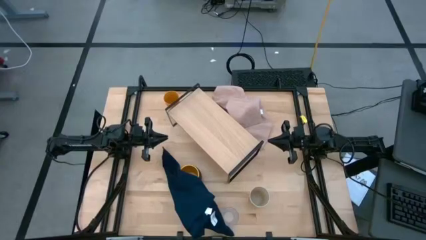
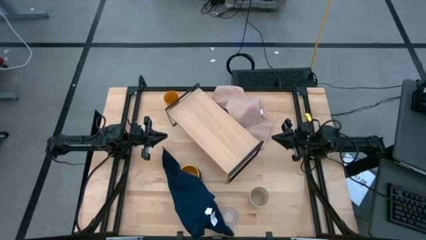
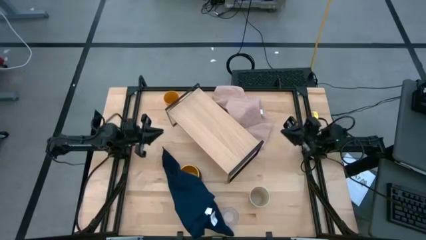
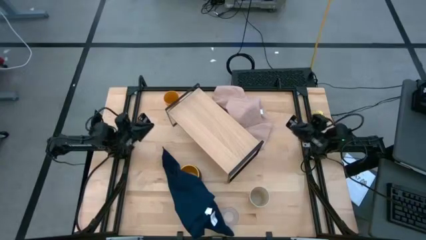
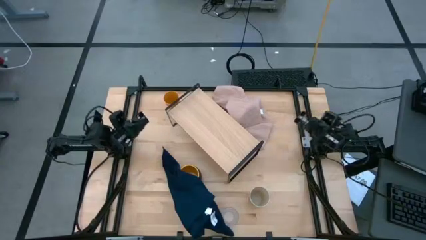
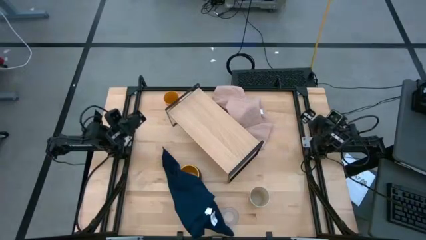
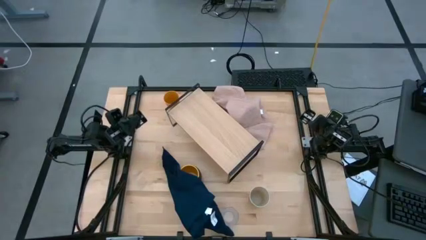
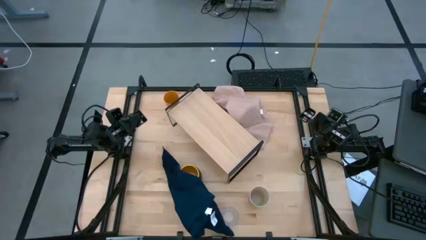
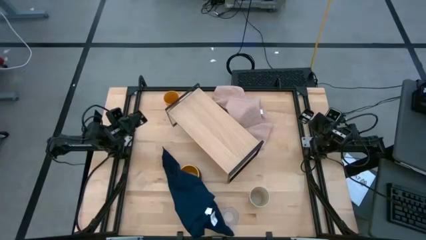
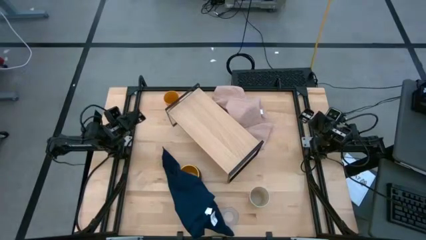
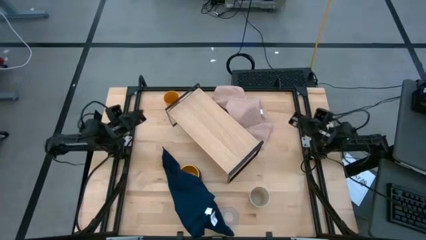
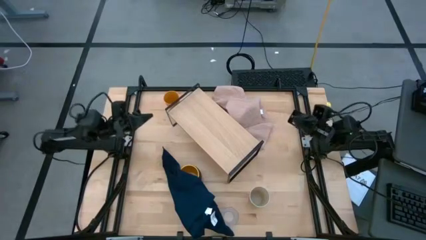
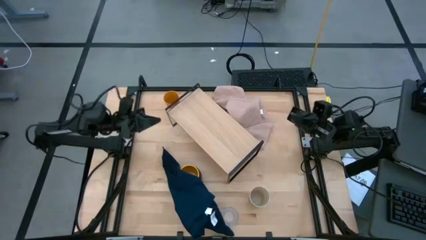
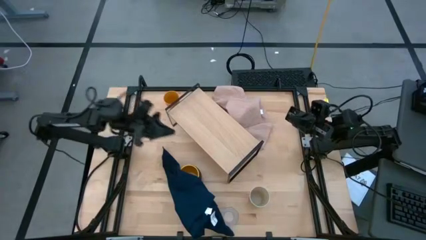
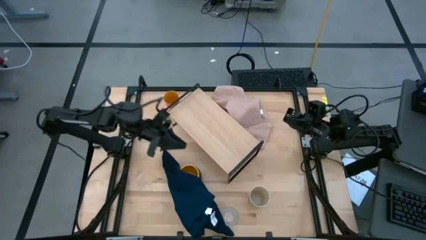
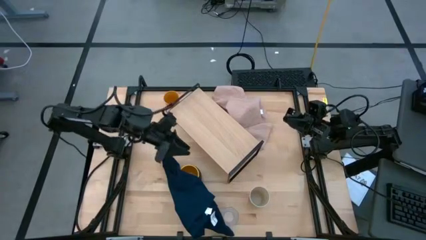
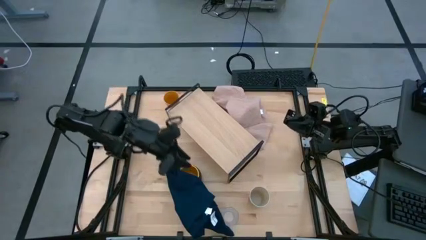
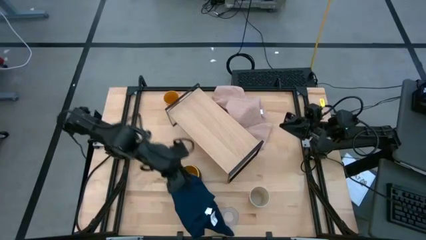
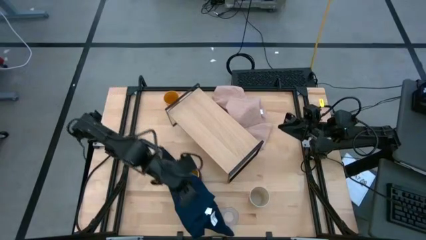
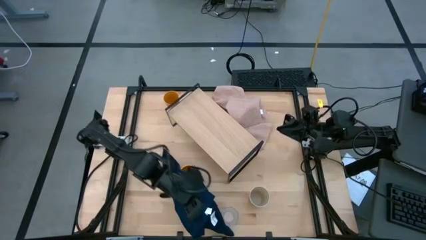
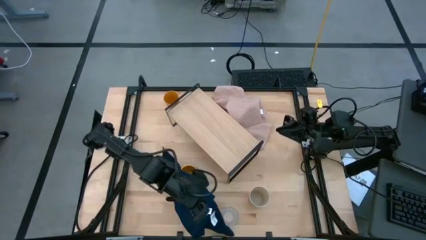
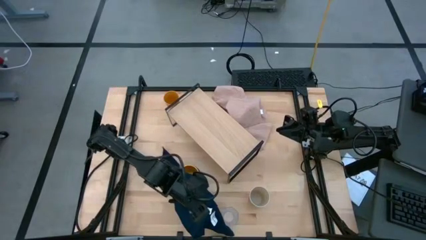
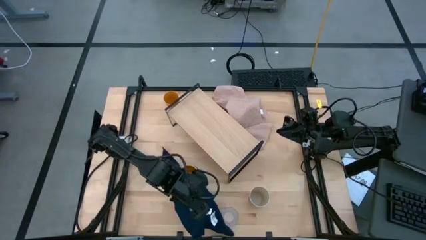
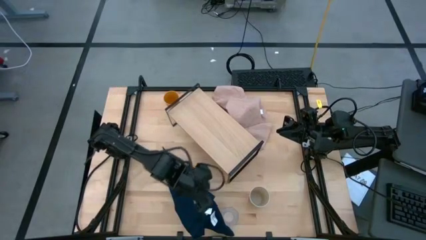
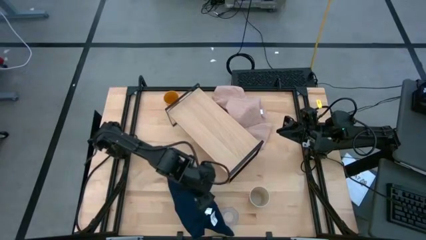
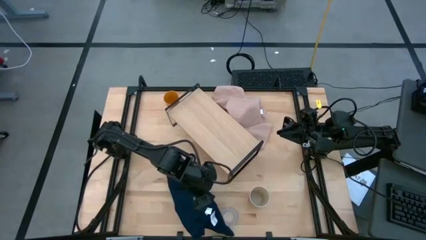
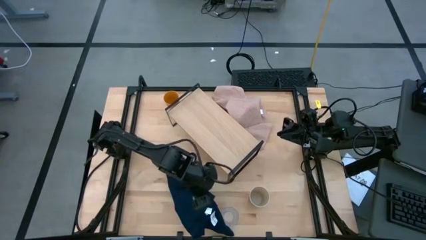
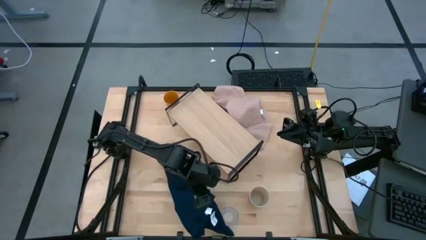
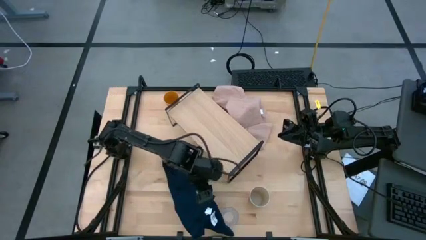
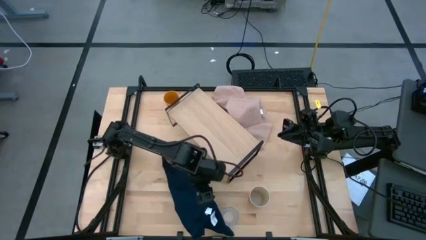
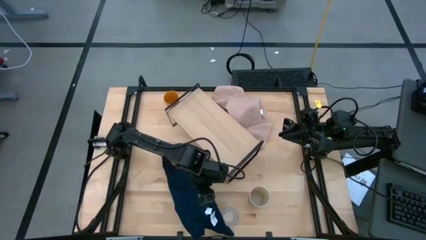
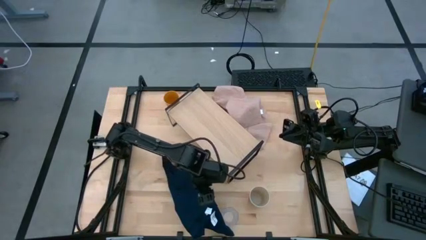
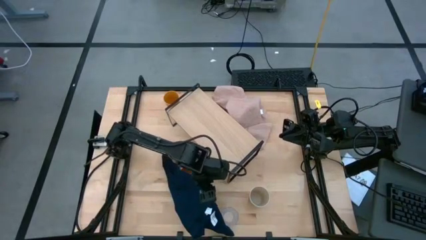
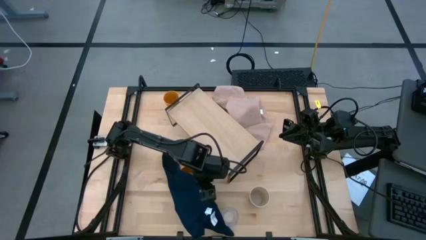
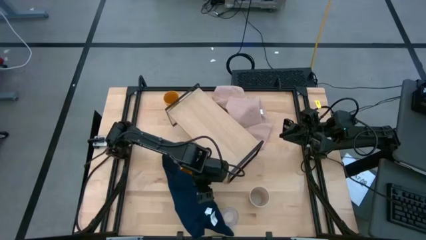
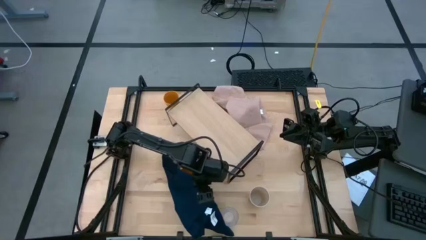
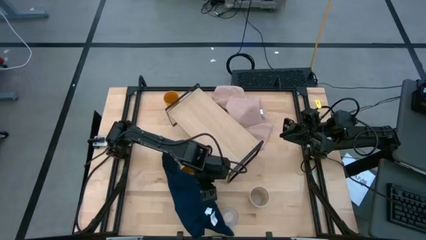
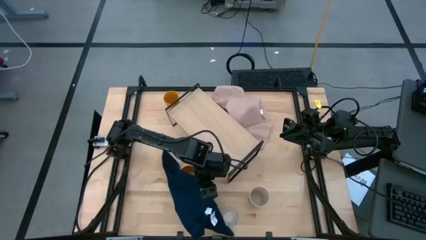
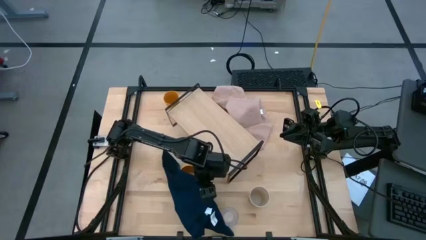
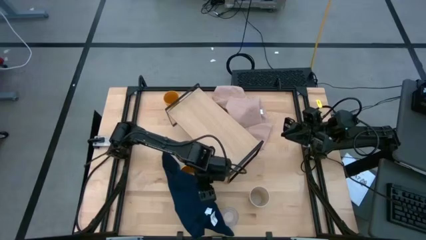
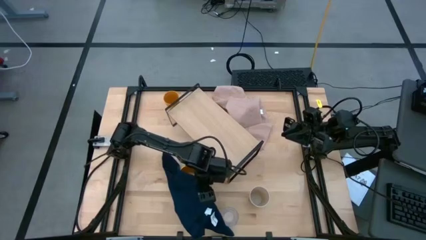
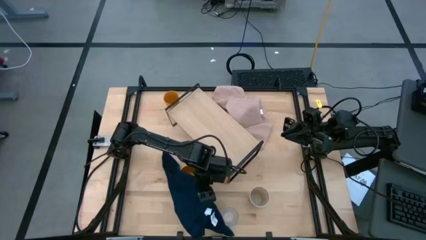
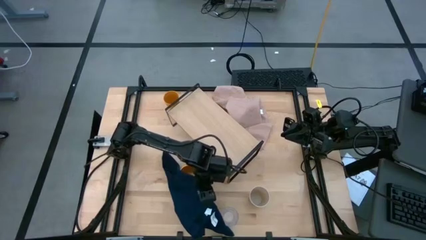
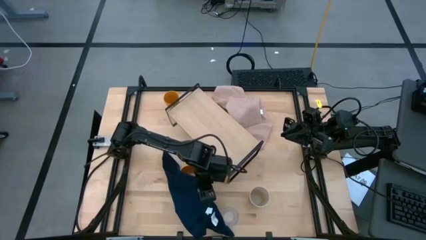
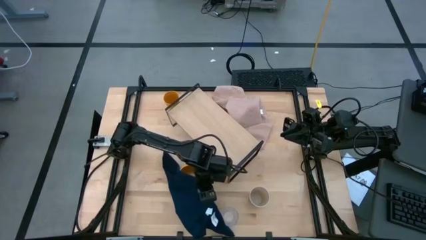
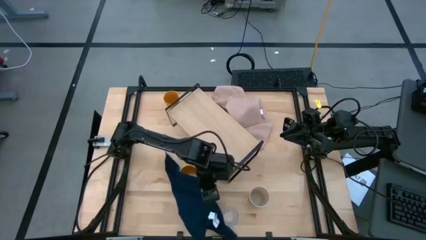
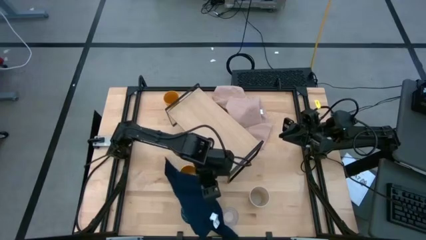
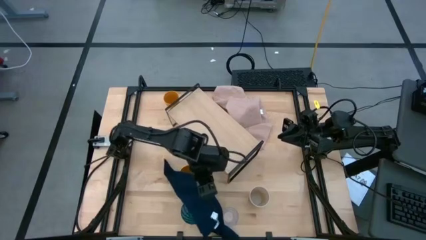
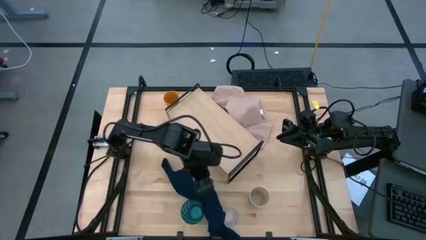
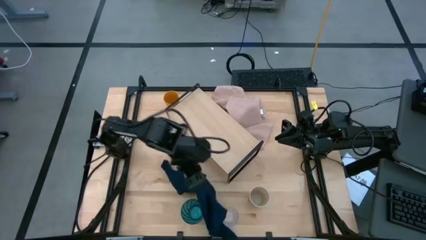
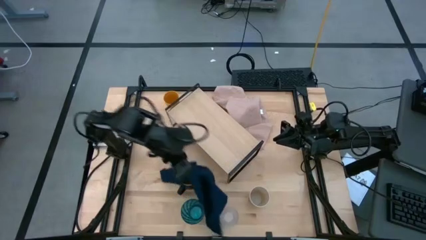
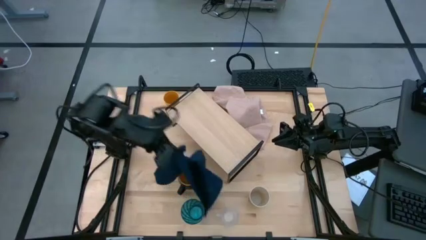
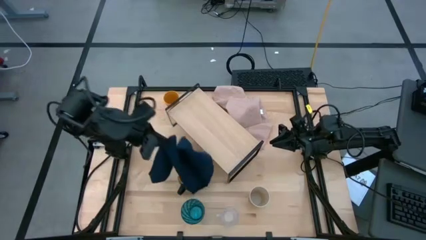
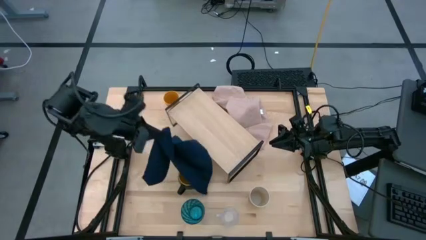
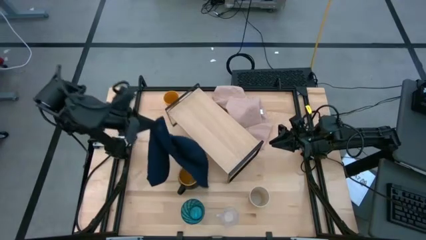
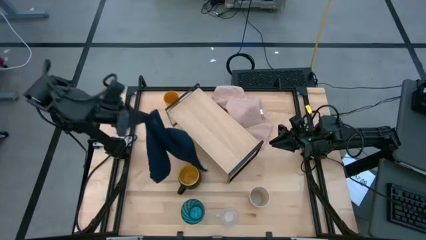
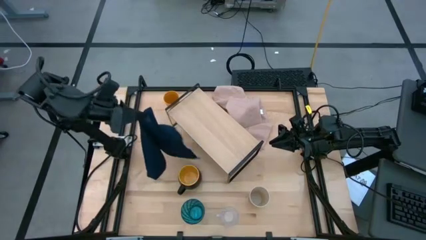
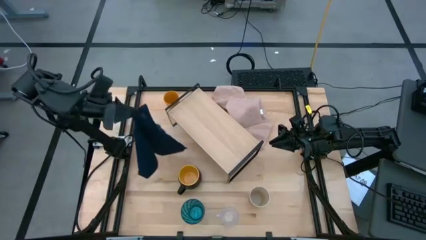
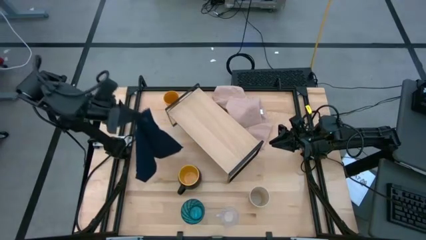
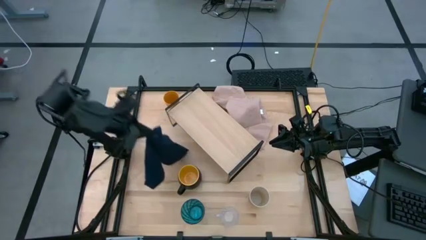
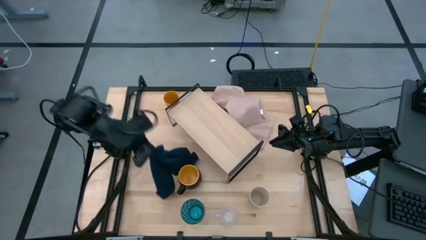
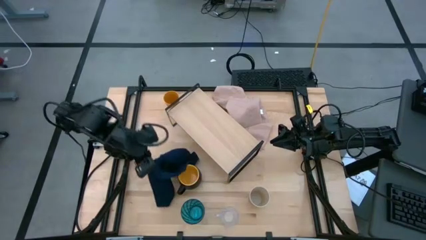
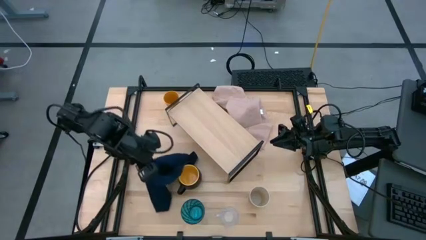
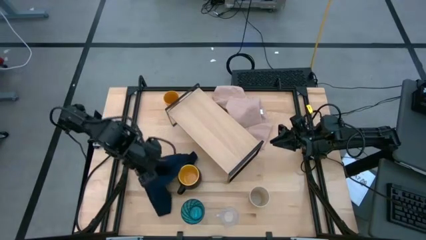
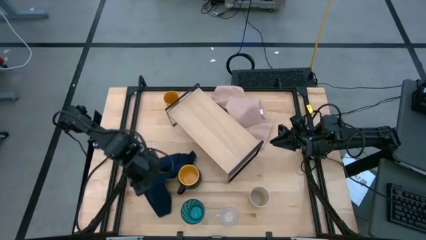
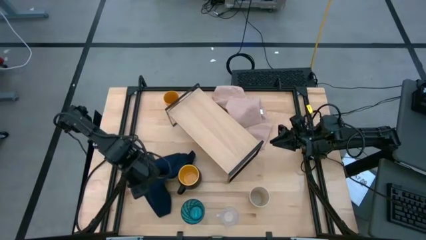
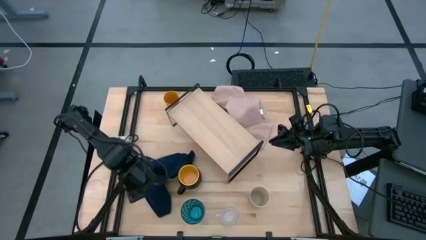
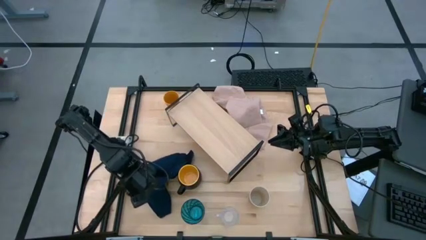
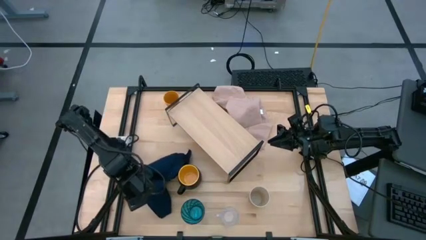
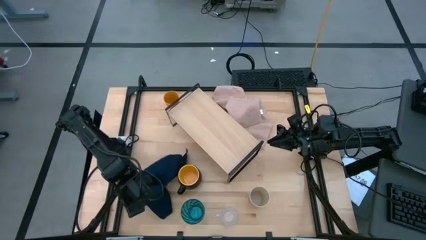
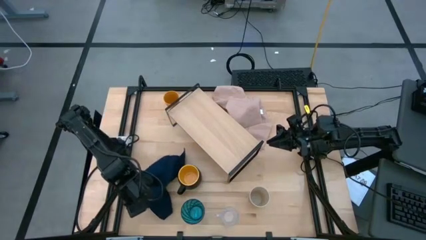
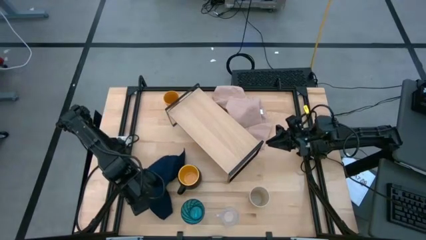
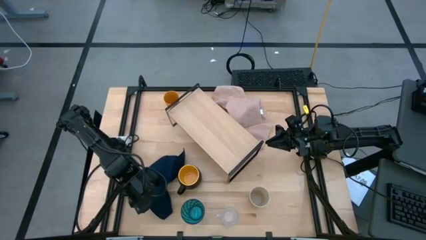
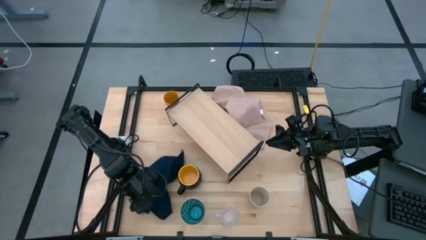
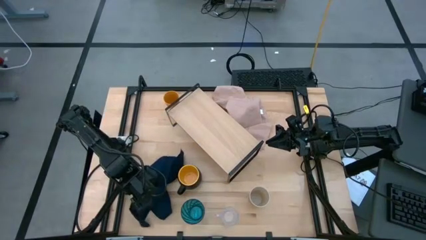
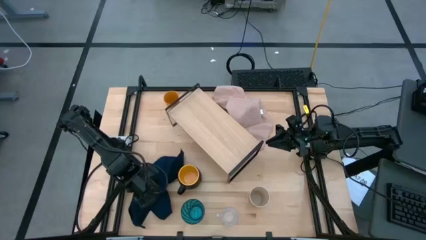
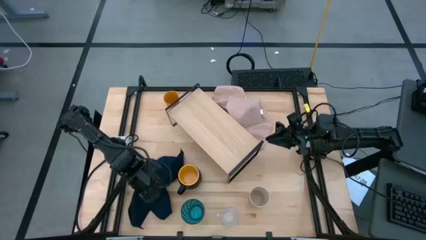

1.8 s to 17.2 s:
Task: Stack small to large cups/mugs on shelf
Remove the blue towel on top of the blue cup
